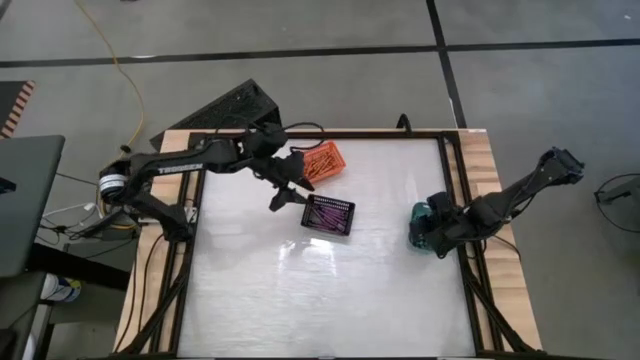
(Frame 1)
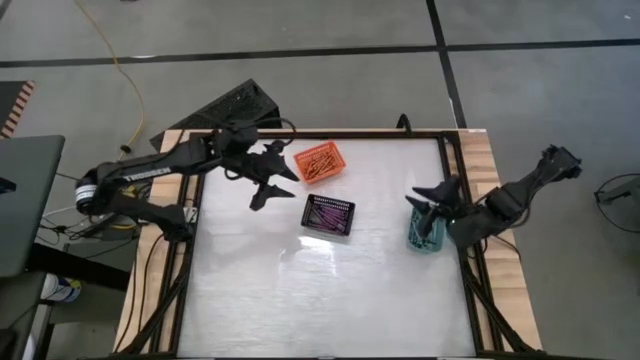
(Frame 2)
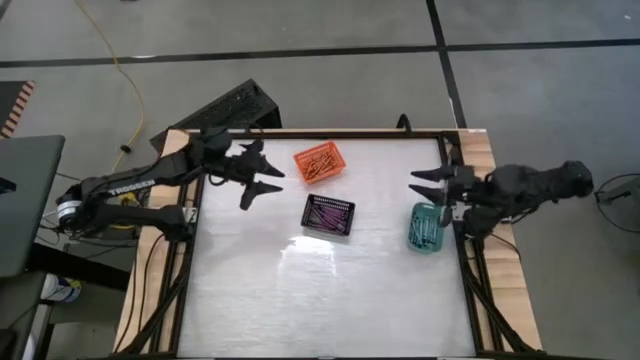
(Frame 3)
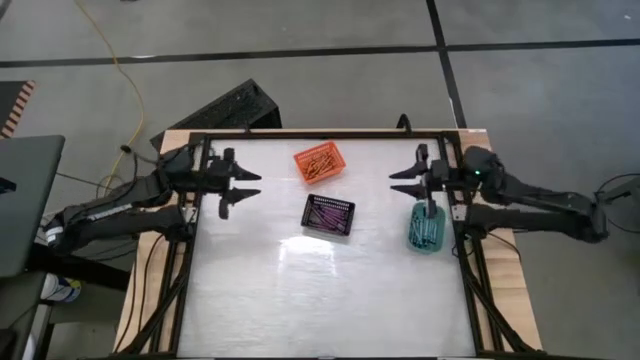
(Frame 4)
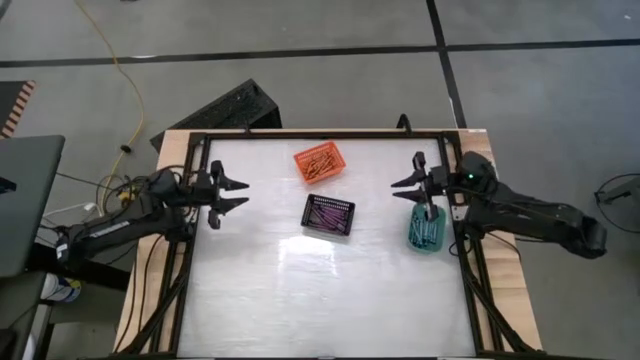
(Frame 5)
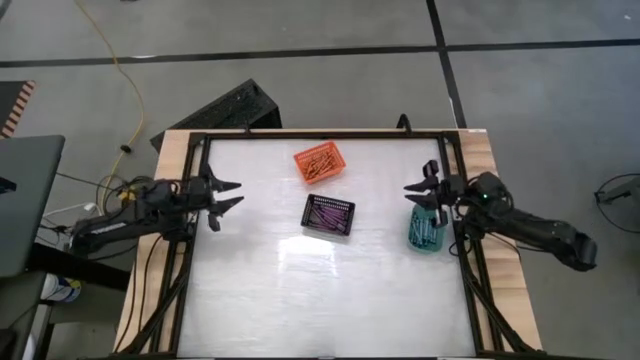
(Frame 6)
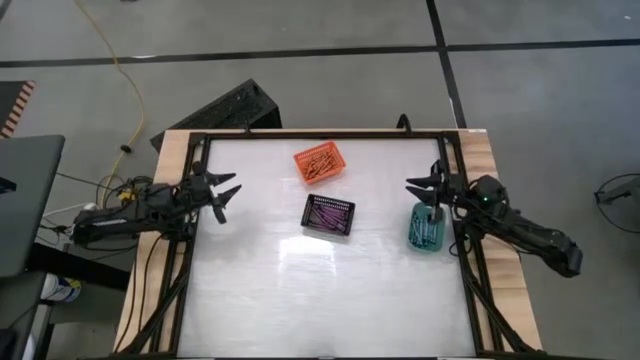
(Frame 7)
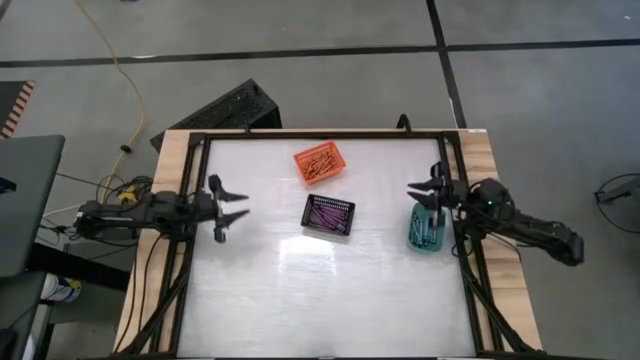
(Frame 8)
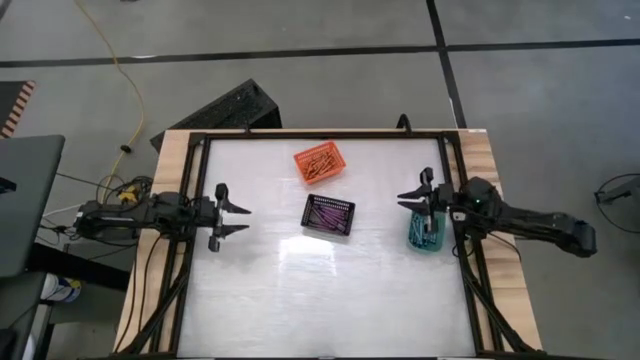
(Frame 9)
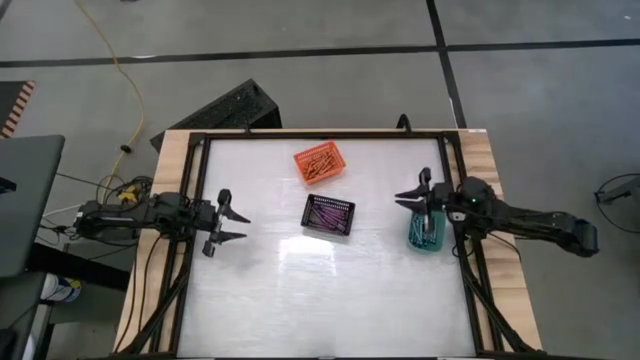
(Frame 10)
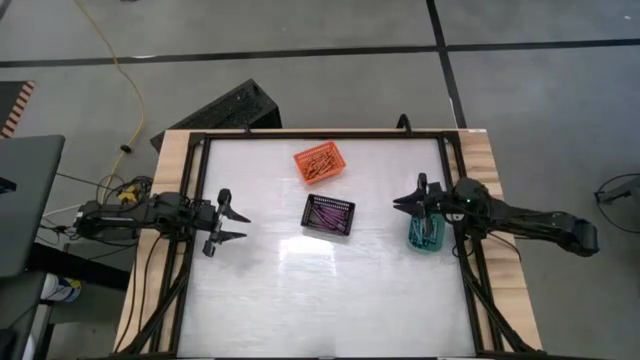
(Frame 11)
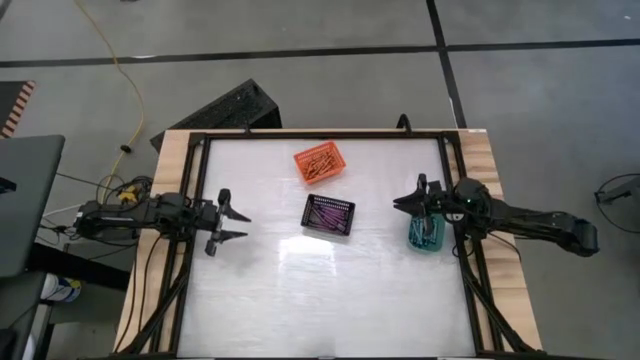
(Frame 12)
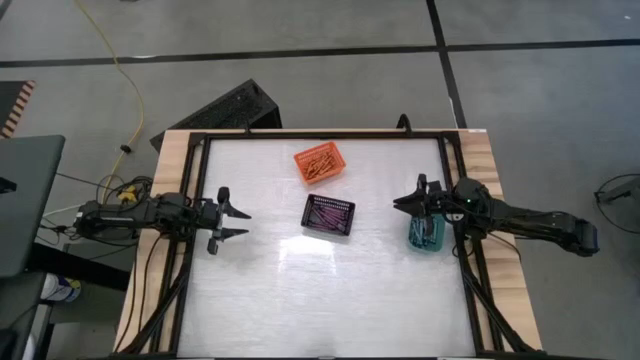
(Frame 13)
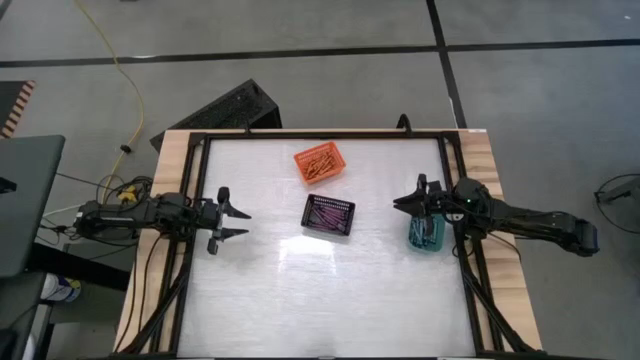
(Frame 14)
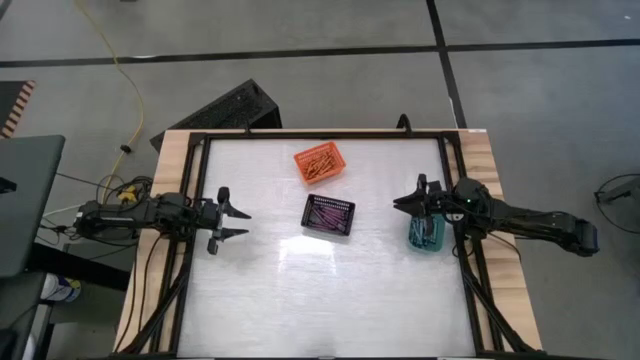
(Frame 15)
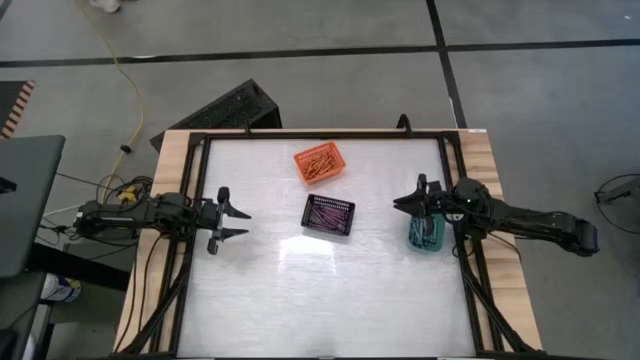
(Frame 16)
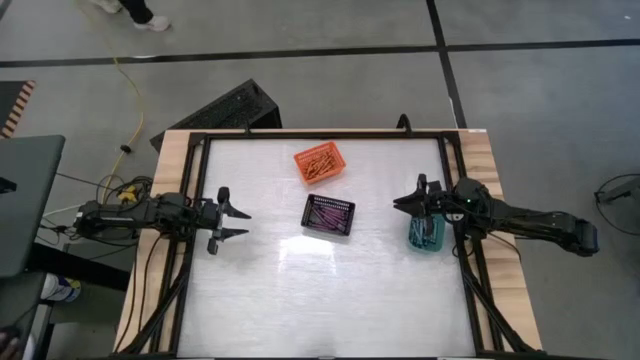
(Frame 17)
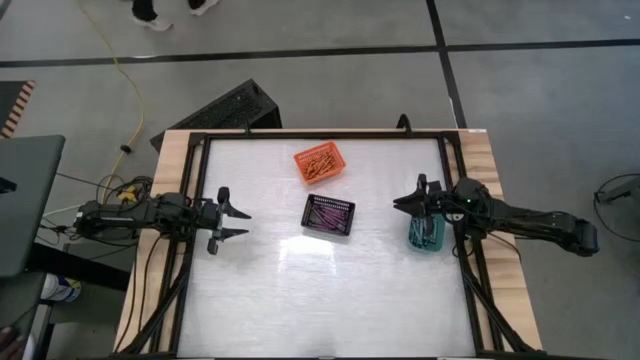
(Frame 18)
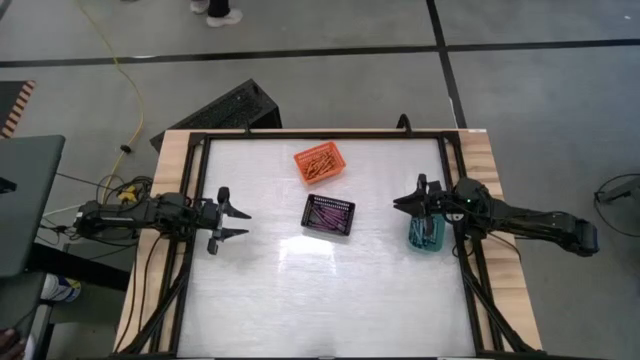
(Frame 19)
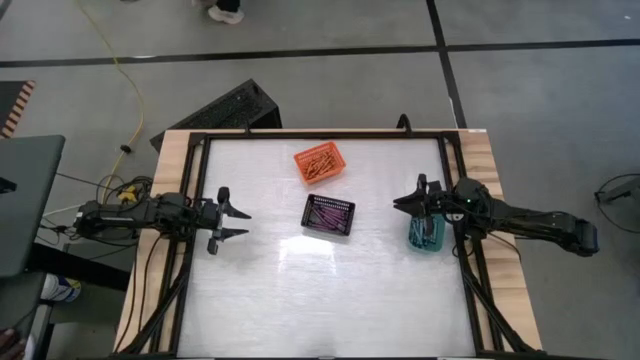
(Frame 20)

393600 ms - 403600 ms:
Task: Sort crayons
Return to Home Position

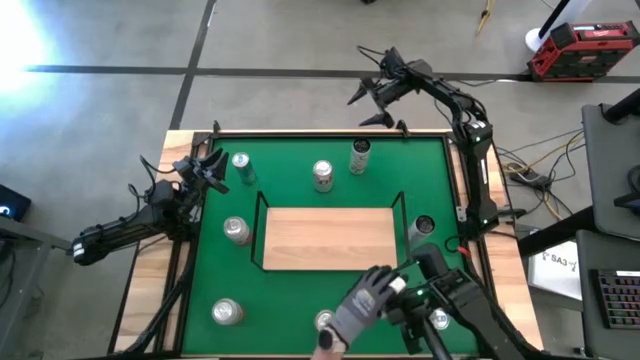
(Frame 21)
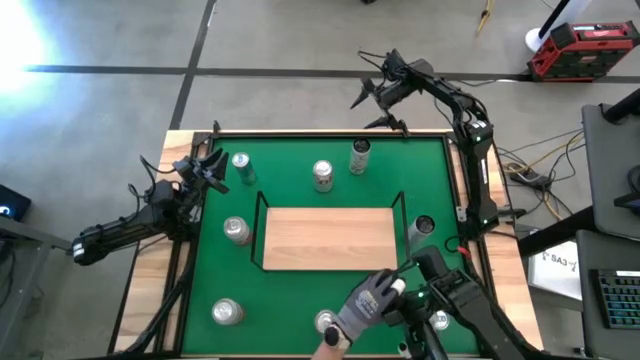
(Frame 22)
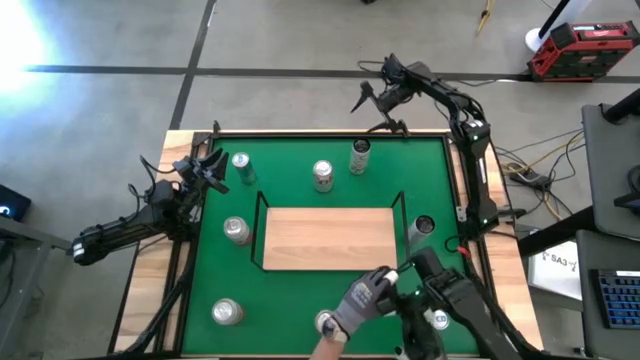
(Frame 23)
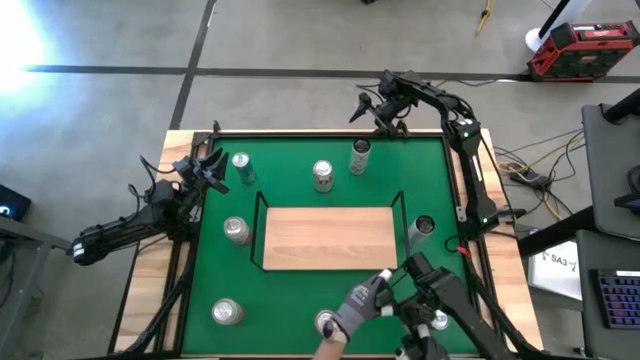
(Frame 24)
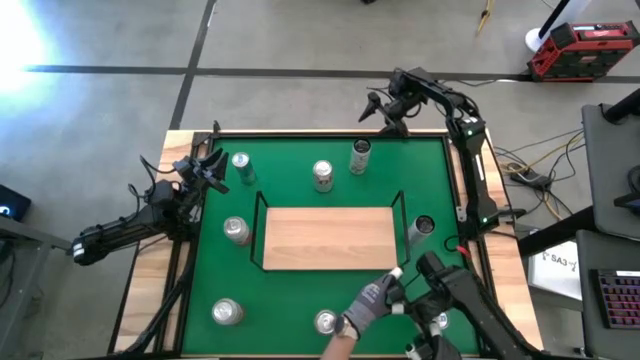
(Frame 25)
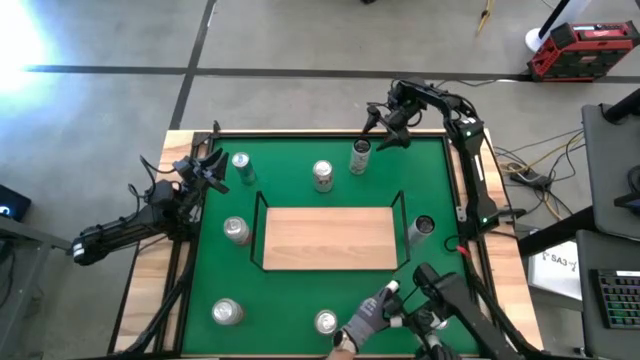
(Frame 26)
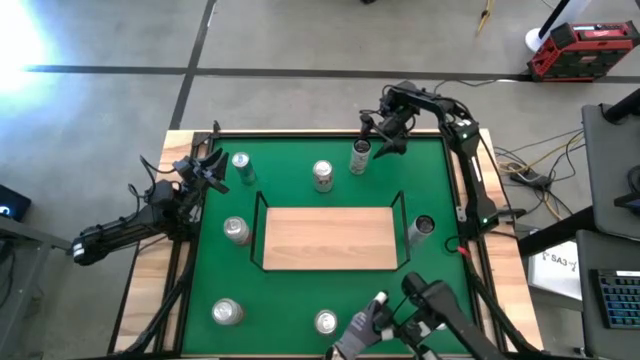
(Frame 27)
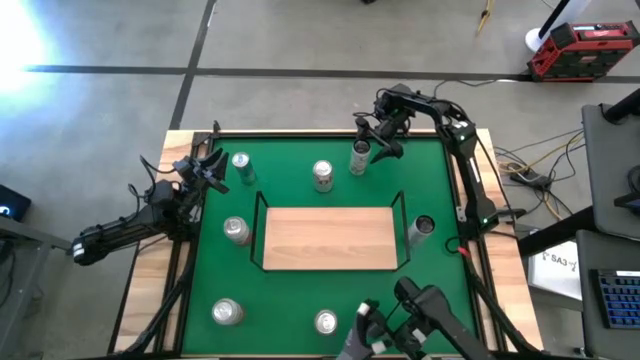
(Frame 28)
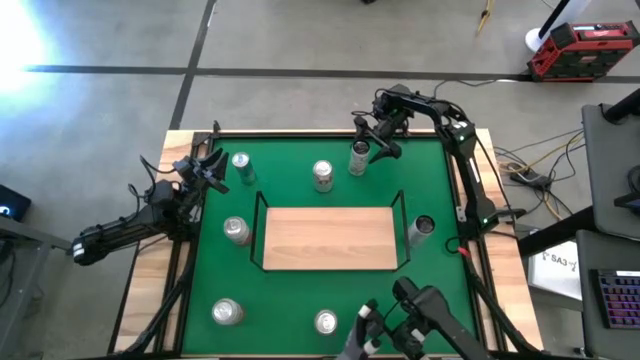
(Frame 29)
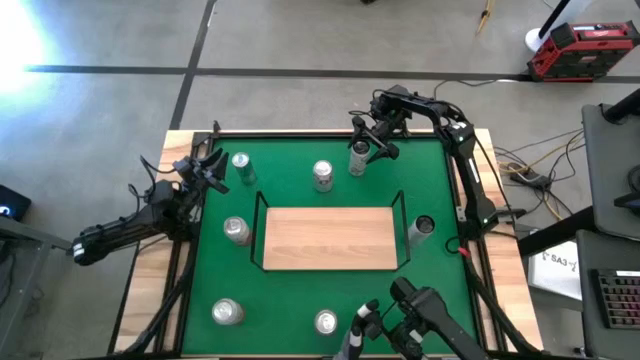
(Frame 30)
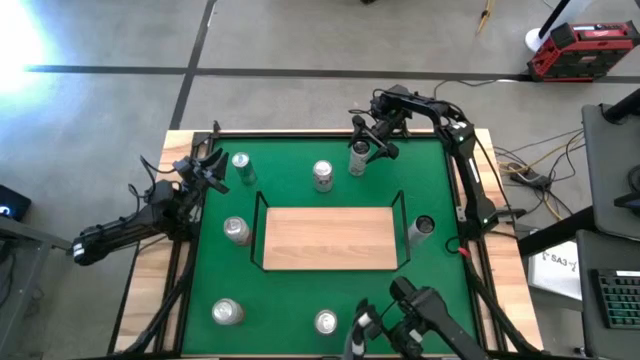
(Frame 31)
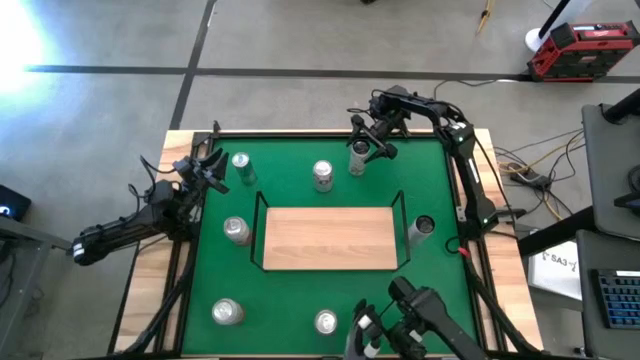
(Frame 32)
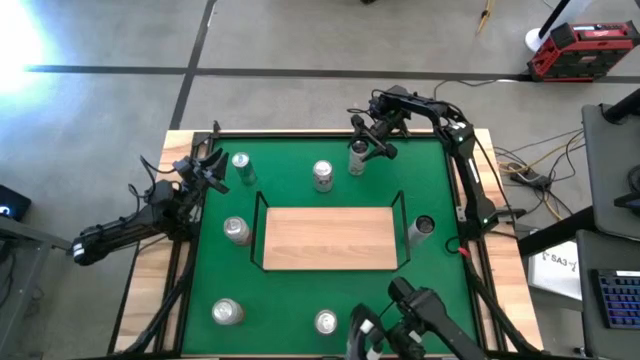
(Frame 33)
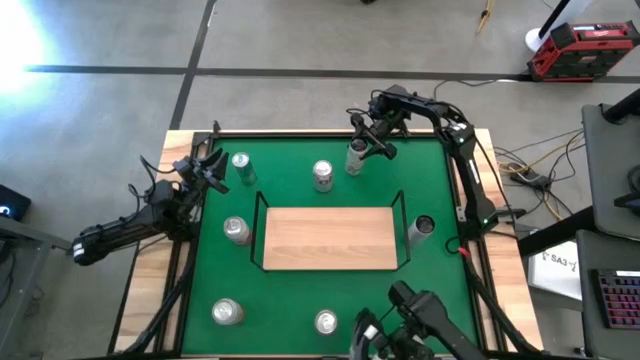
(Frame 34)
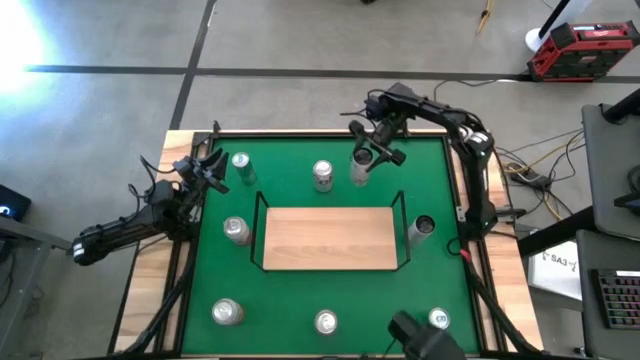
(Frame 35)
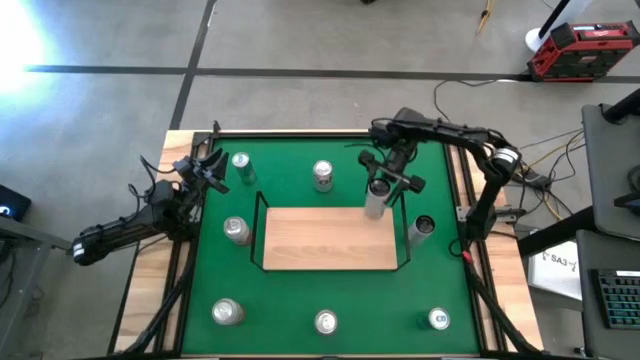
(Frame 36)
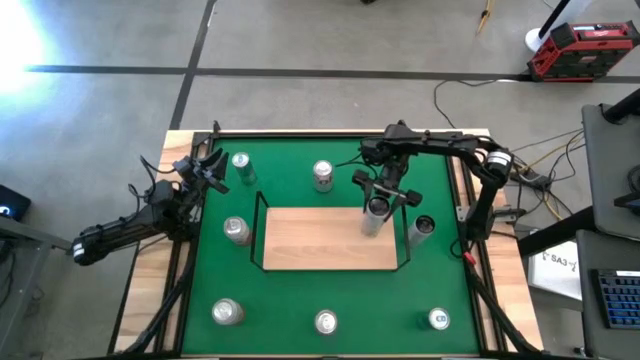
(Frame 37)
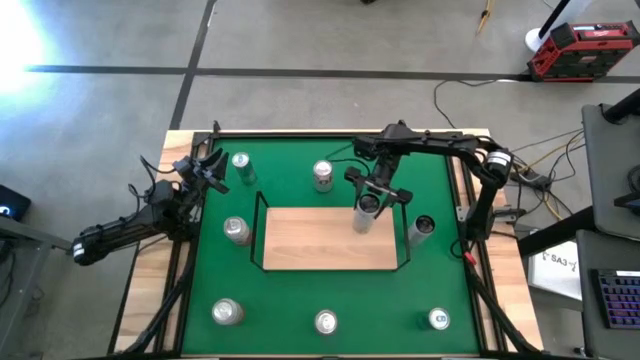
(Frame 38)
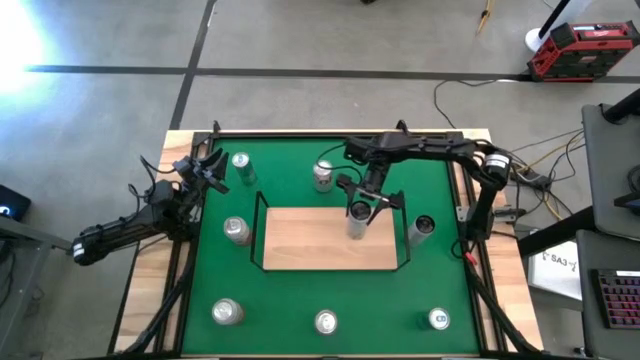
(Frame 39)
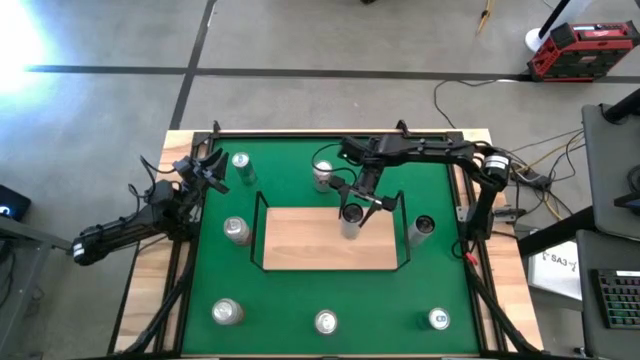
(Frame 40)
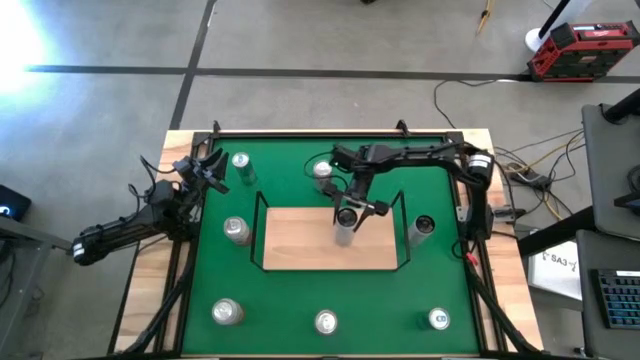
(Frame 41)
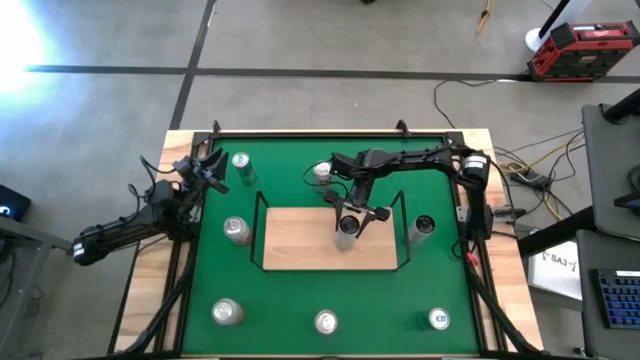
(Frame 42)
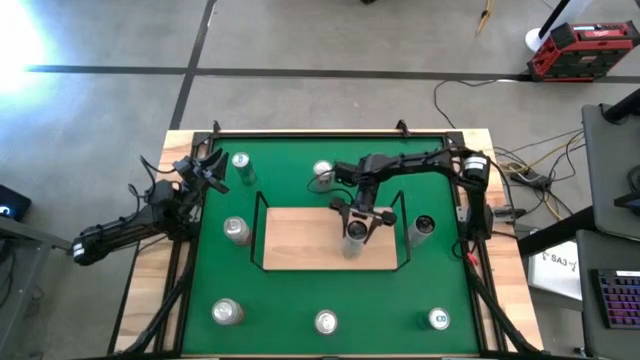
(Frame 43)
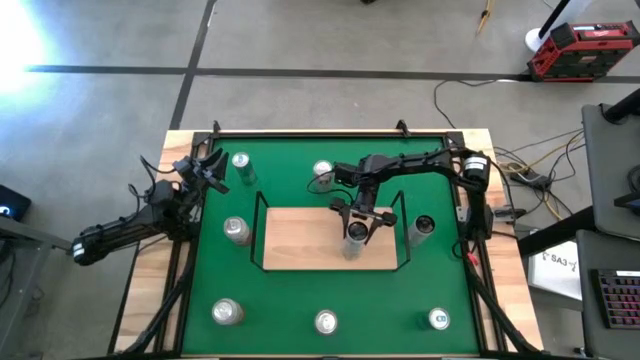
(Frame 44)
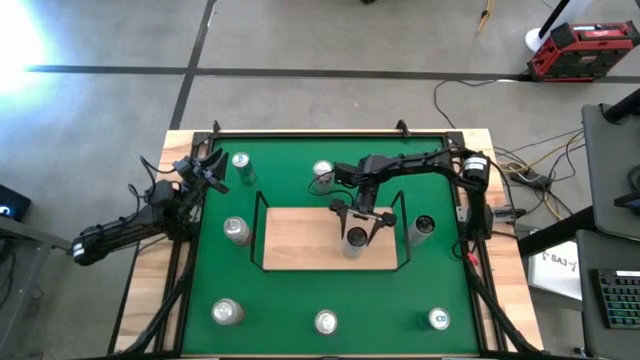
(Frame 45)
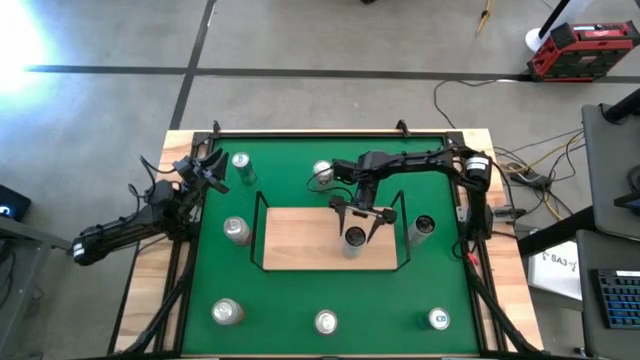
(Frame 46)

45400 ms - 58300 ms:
Task: Place canned beverage on shelf
Put the top white-yellow soda can on the shelf
